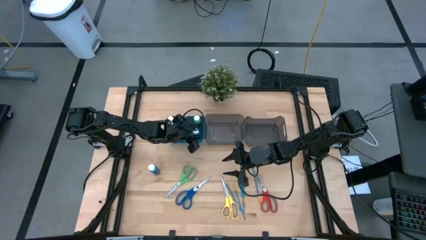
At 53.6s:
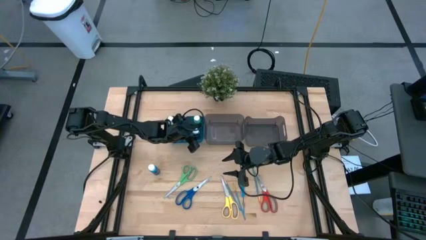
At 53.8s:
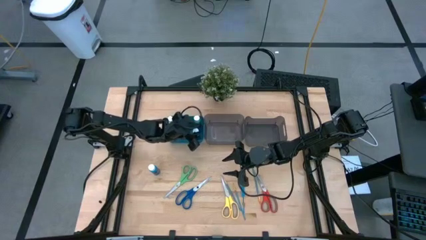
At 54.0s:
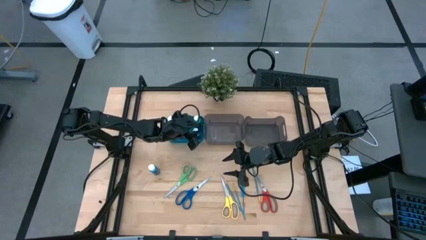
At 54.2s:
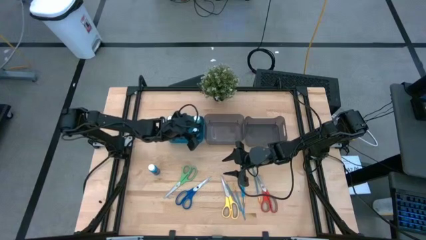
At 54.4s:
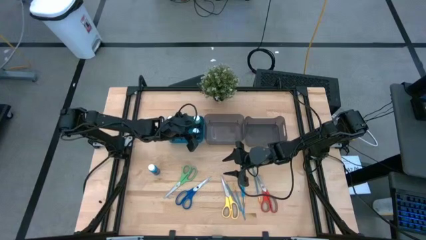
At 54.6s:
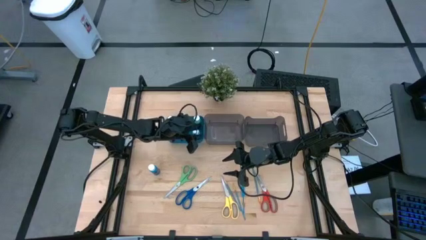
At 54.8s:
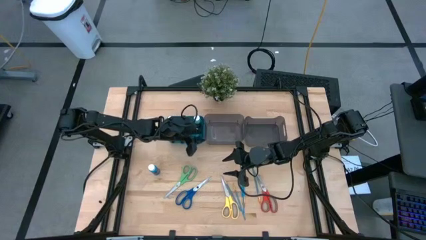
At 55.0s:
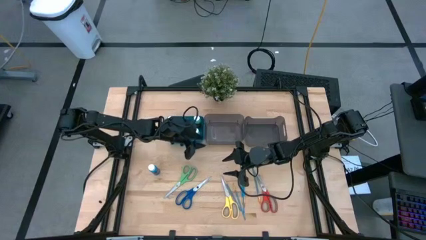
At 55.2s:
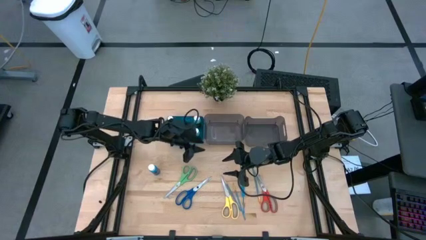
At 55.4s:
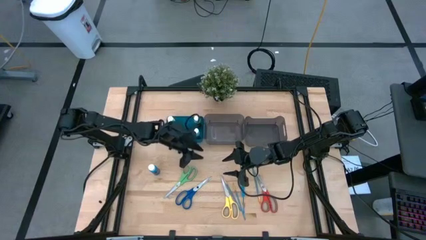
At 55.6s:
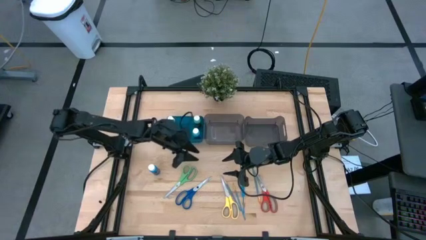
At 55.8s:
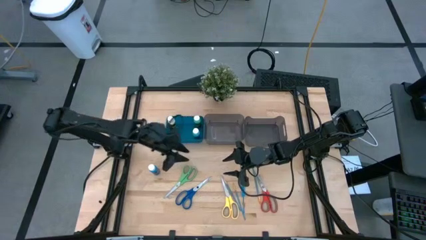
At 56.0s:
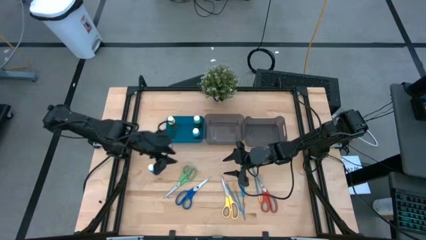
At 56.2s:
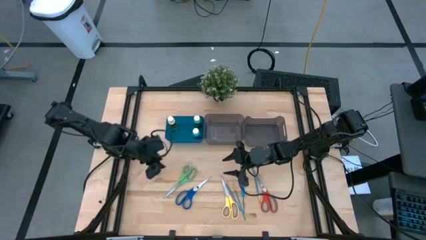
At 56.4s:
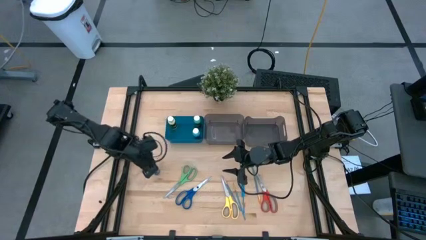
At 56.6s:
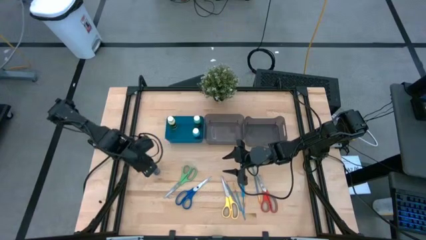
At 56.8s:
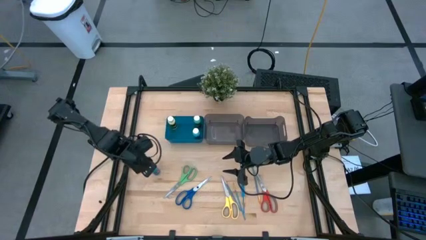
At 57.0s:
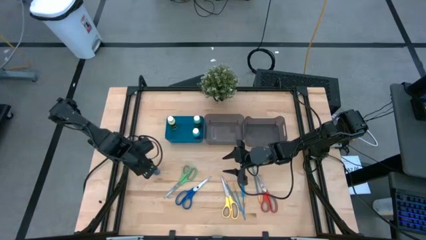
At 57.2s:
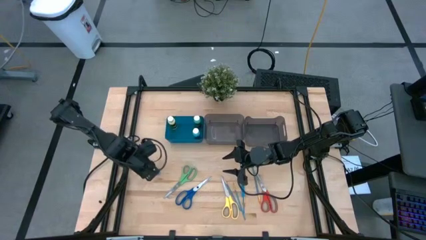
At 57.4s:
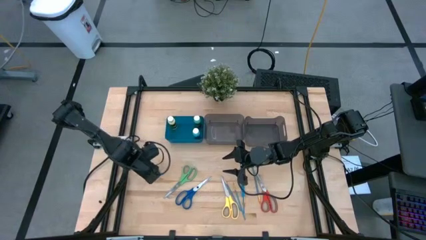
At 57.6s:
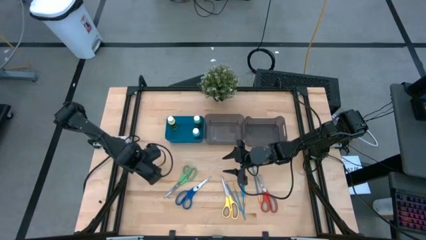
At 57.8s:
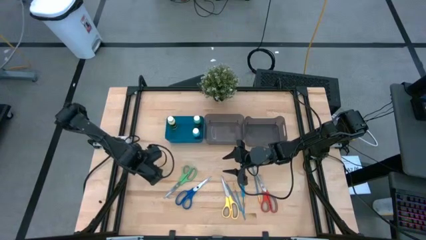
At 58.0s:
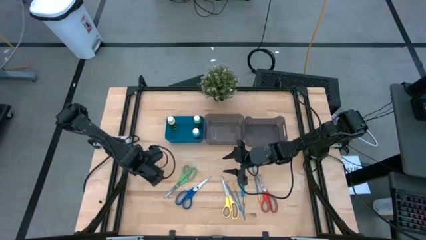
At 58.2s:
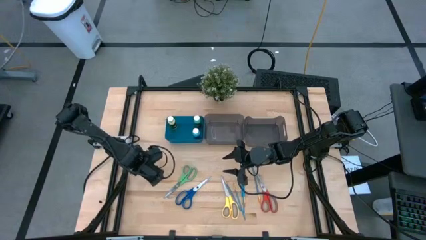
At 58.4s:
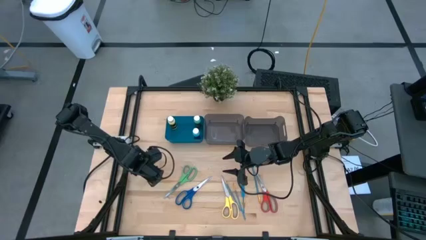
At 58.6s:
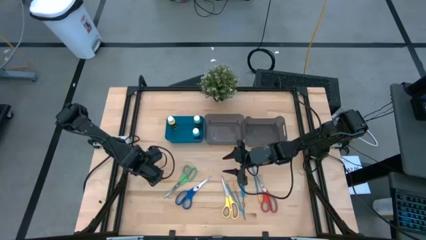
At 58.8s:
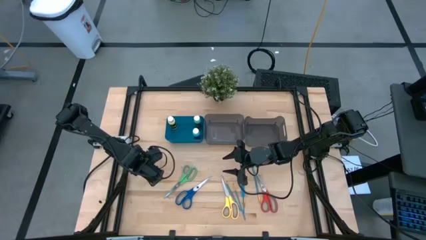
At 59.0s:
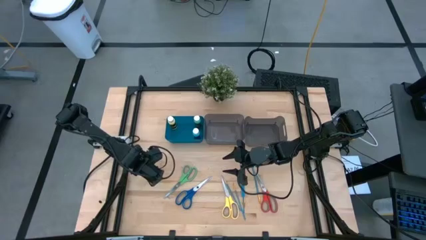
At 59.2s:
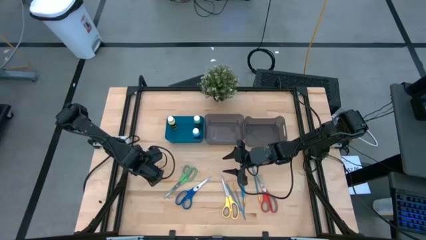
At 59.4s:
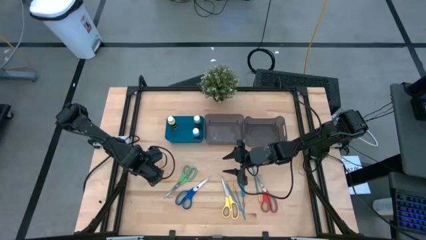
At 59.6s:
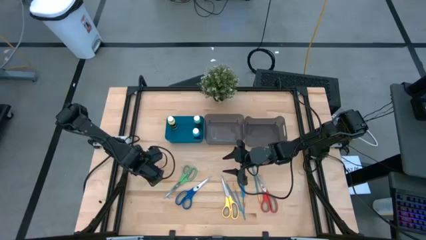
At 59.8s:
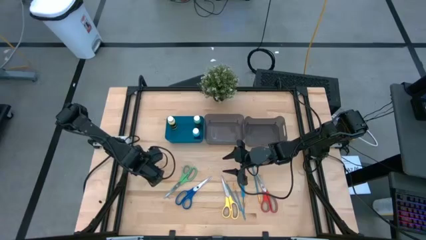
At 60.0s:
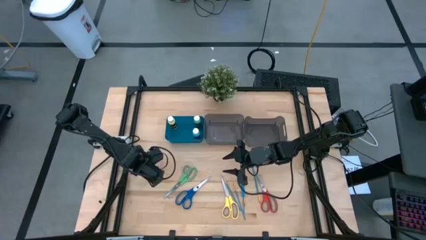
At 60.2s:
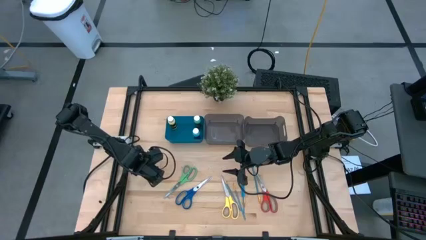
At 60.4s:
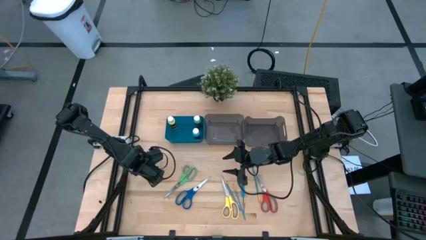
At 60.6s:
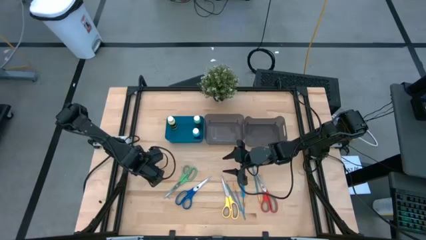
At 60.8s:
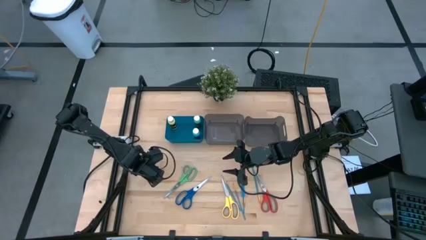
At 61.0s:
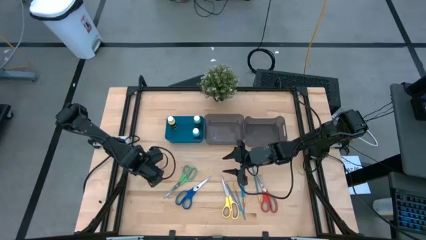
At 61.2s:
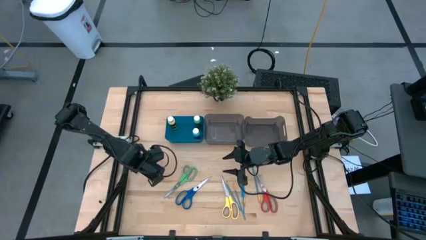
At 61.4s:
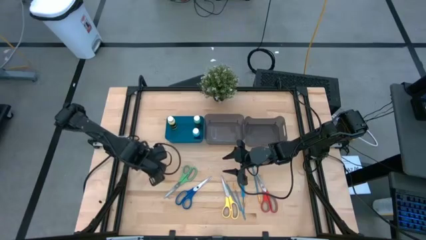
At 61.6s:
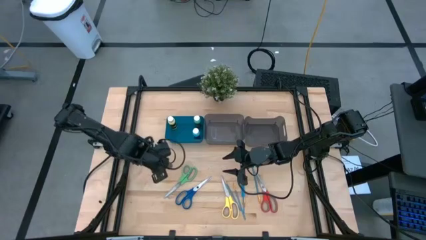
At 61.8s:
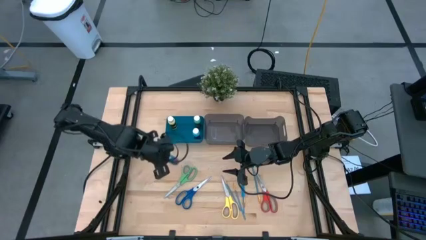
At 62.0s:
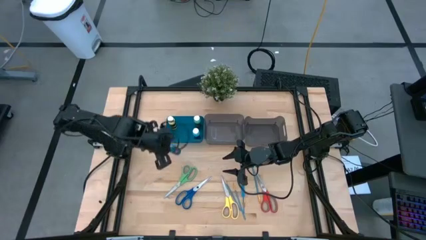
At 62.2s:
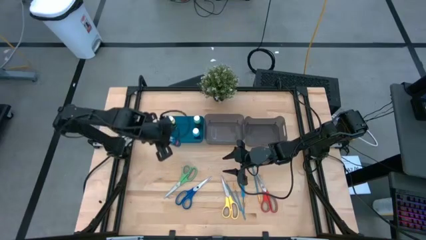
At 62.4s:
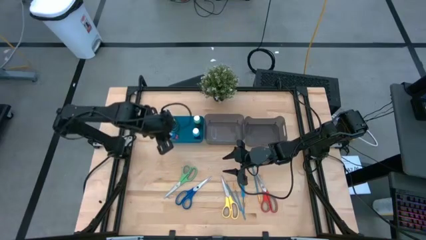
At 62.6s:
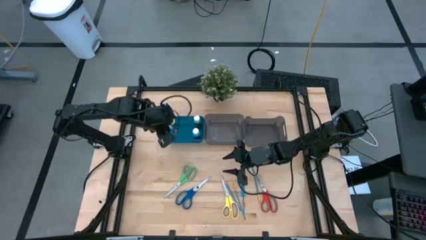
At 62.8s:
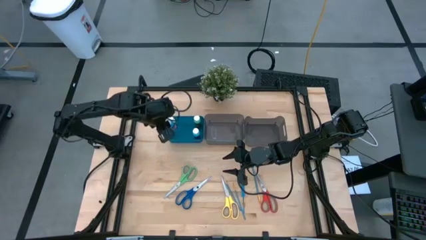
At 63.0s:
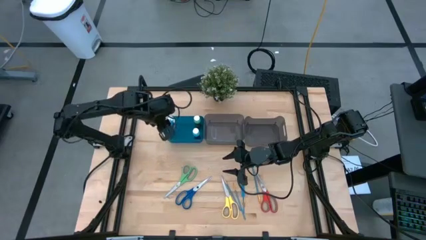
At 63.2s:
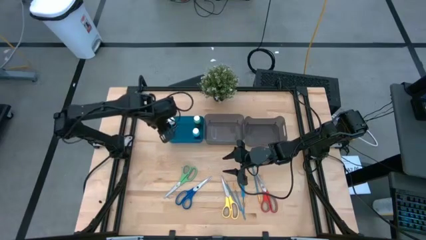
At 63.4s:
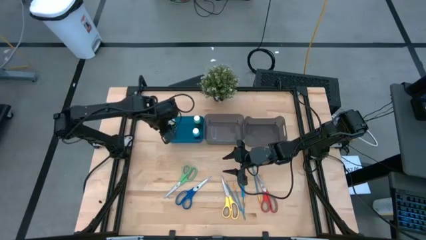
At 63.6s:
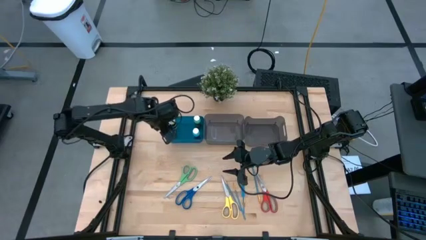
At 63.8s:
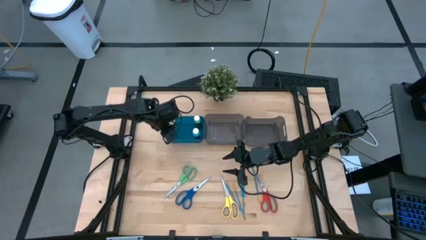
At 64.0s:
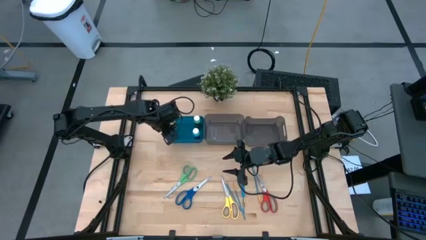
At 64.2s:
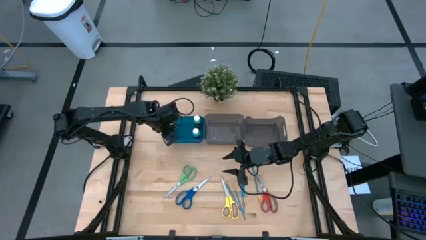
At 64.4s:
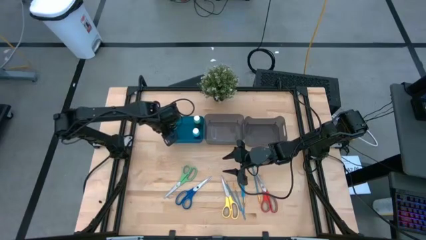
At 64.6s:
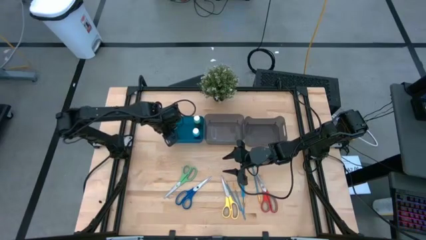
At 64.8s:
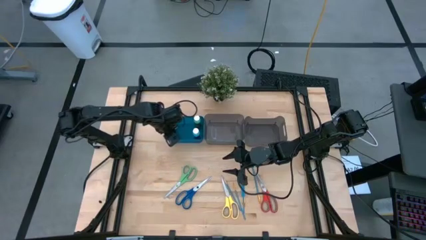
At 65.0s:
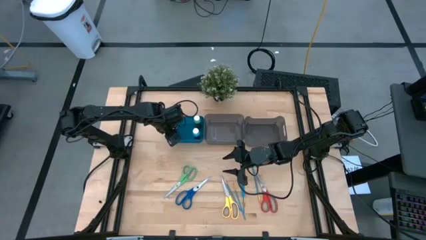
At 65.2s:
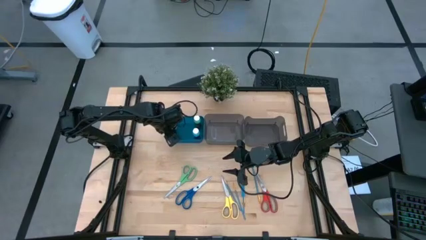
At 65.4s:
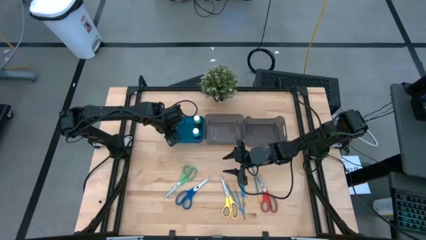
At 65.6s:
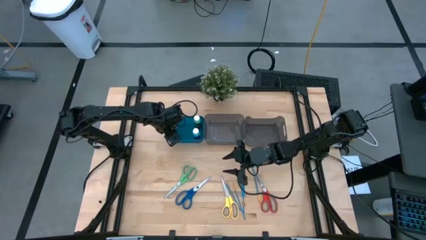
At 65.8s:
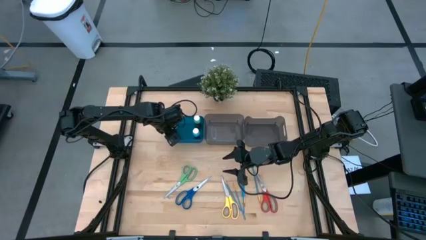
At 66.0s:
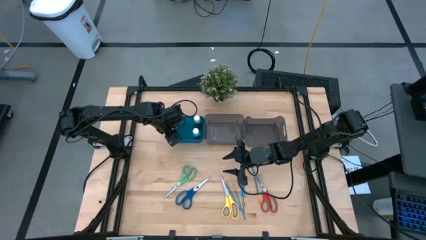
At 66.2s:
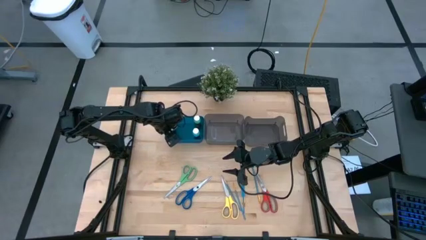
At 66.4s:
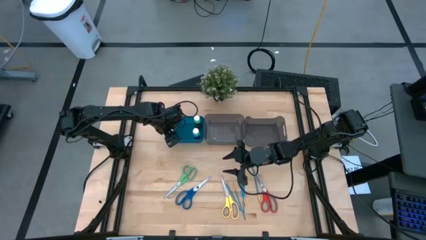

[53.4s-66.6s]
Task: Pick & Place Paint Supplies
Put the blue paint bottle into the blue bin
